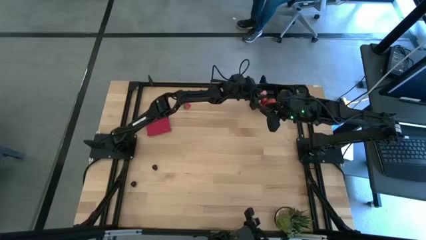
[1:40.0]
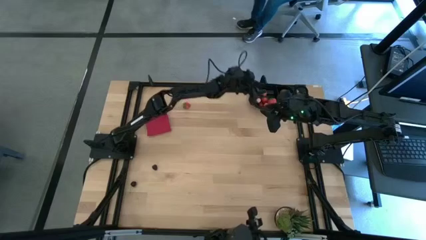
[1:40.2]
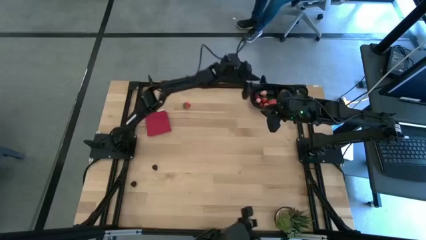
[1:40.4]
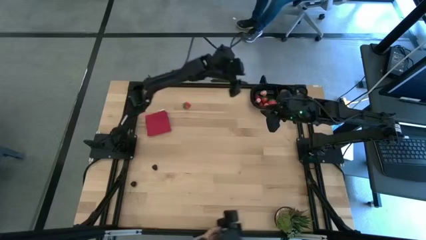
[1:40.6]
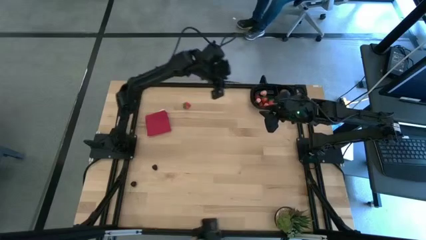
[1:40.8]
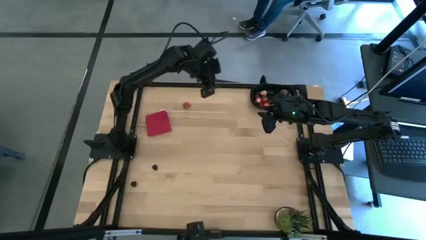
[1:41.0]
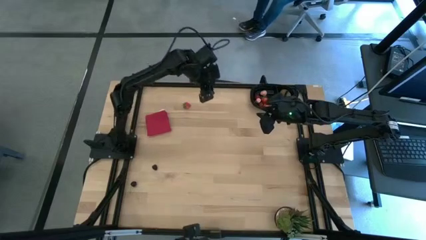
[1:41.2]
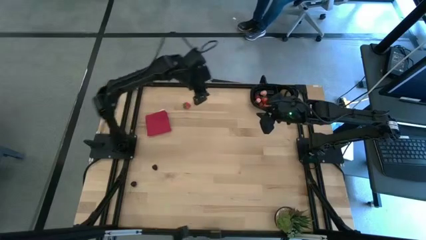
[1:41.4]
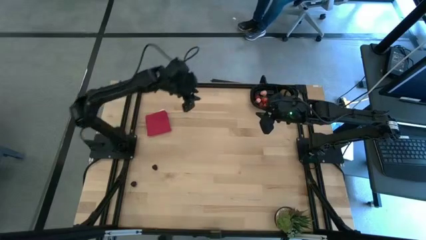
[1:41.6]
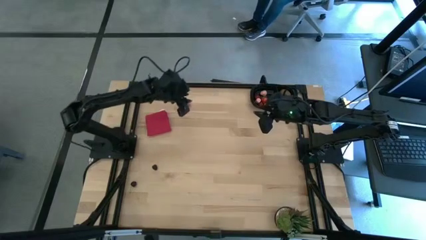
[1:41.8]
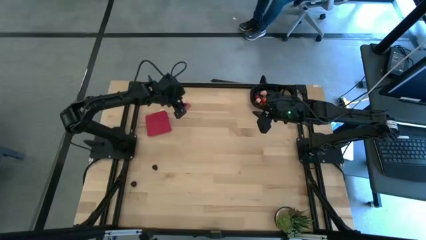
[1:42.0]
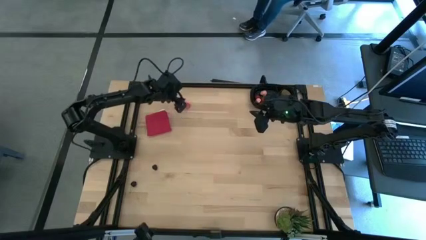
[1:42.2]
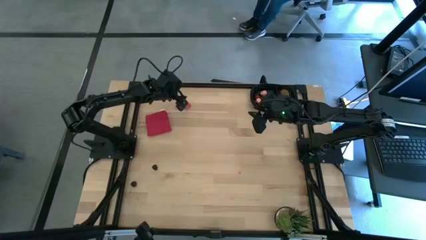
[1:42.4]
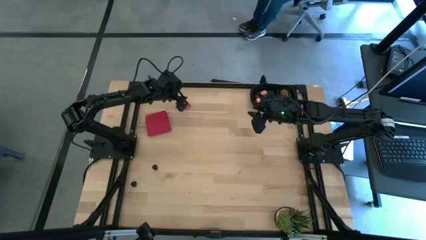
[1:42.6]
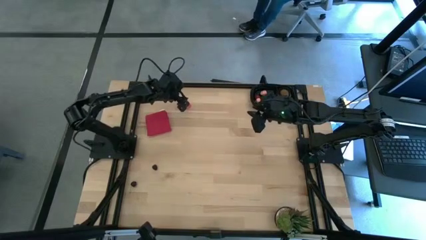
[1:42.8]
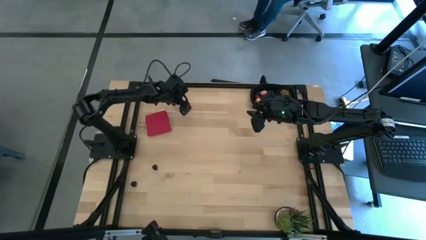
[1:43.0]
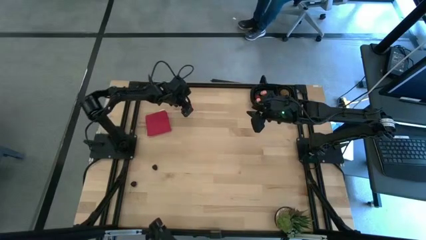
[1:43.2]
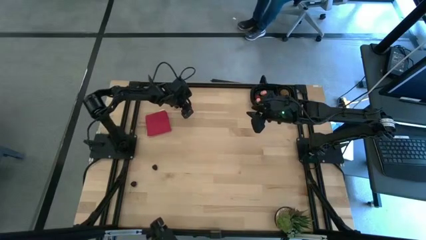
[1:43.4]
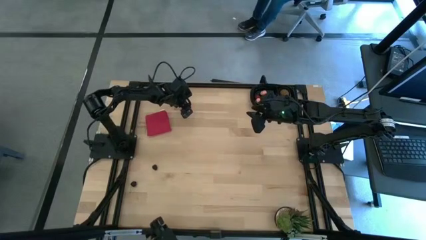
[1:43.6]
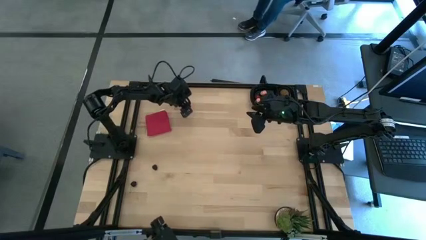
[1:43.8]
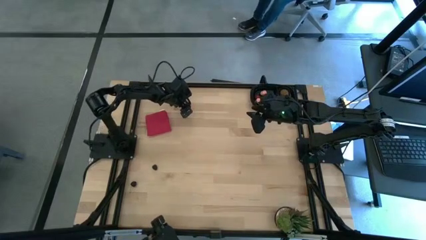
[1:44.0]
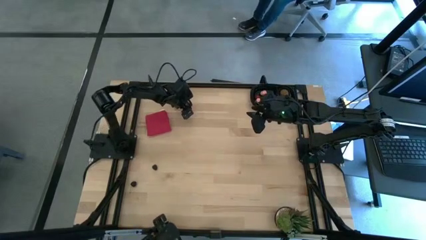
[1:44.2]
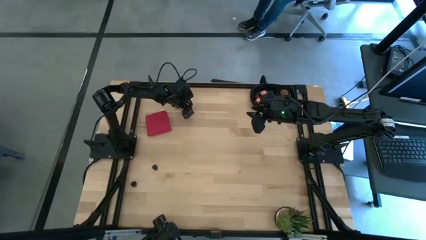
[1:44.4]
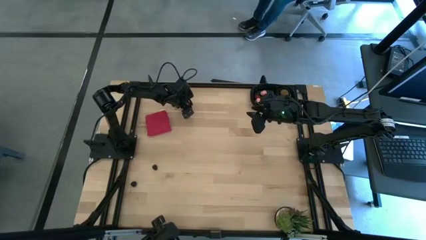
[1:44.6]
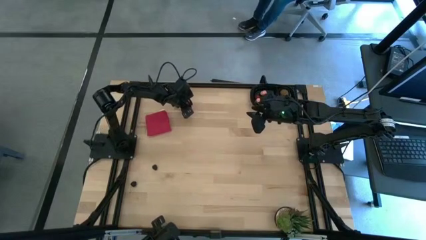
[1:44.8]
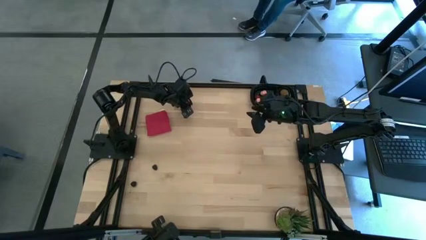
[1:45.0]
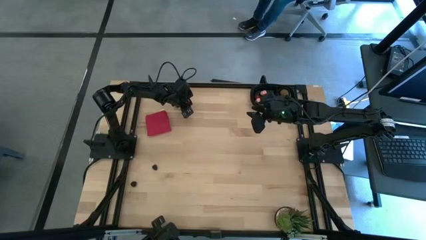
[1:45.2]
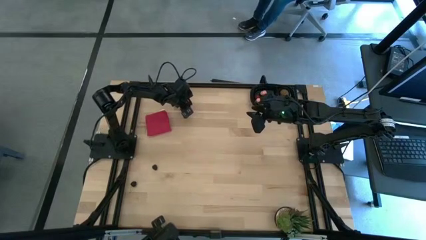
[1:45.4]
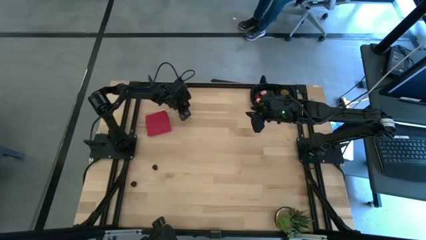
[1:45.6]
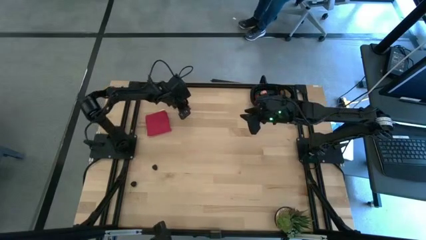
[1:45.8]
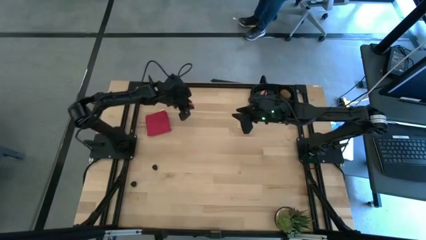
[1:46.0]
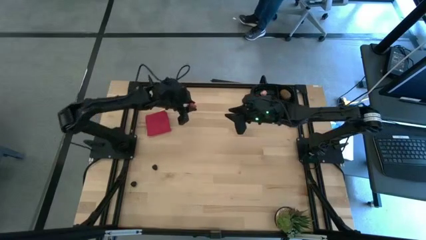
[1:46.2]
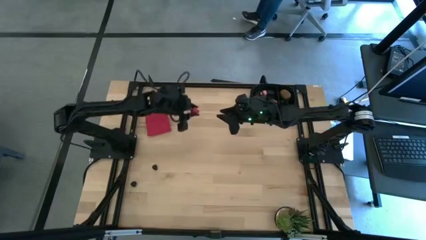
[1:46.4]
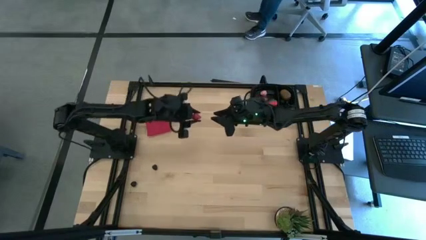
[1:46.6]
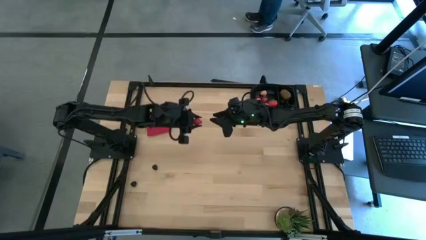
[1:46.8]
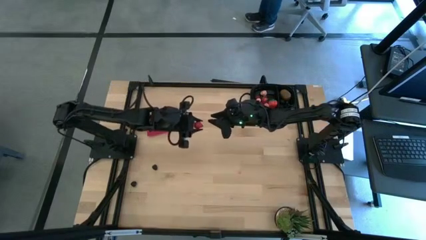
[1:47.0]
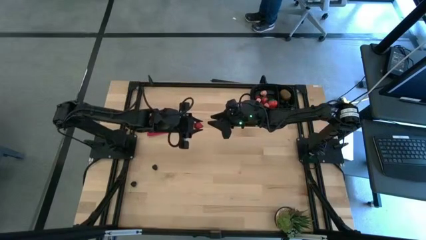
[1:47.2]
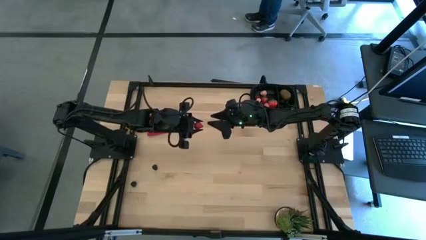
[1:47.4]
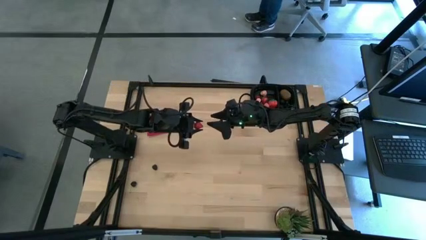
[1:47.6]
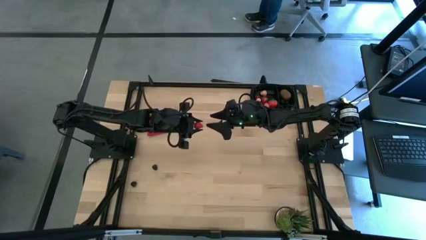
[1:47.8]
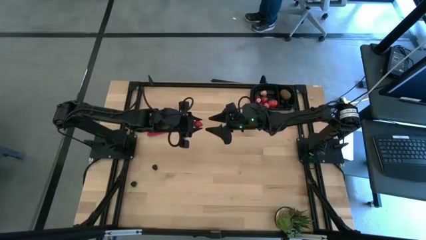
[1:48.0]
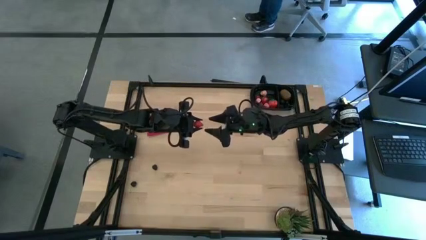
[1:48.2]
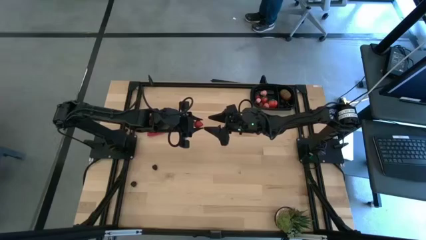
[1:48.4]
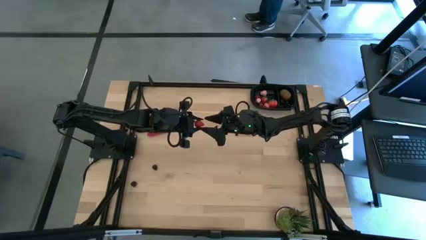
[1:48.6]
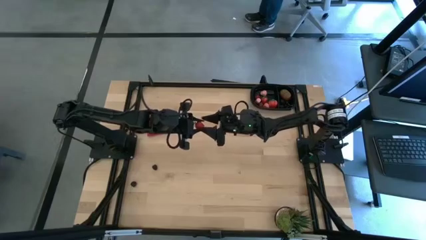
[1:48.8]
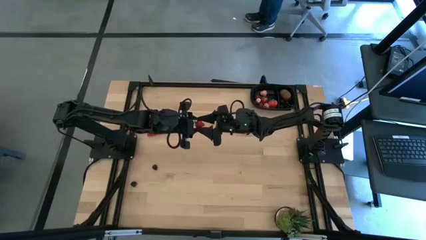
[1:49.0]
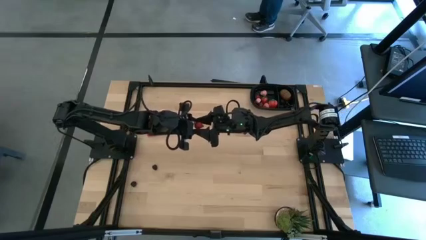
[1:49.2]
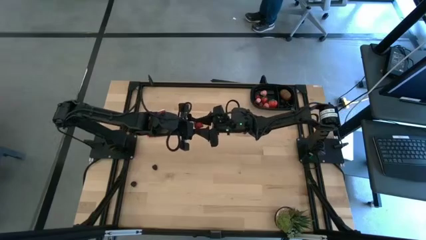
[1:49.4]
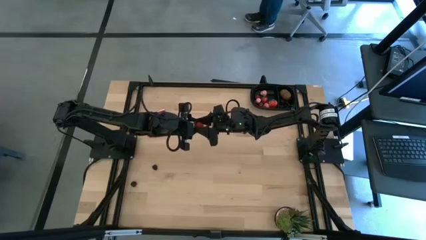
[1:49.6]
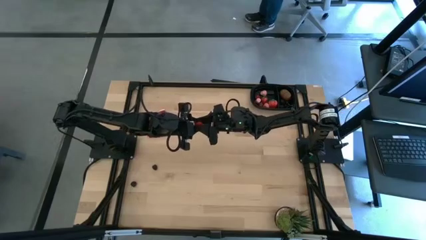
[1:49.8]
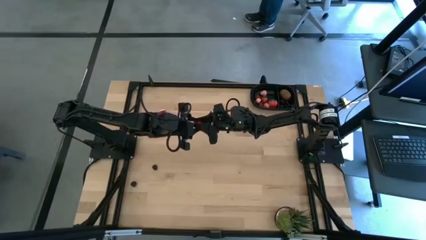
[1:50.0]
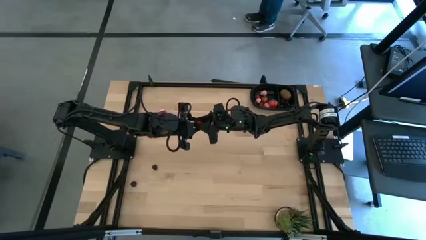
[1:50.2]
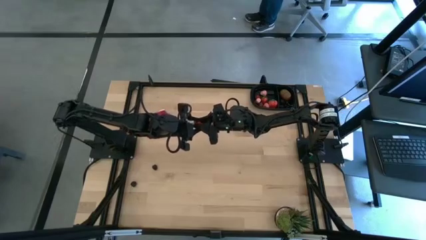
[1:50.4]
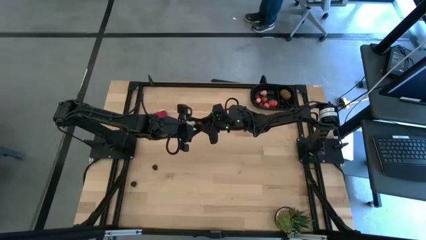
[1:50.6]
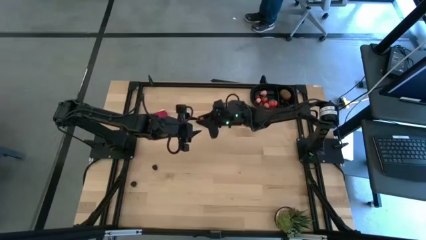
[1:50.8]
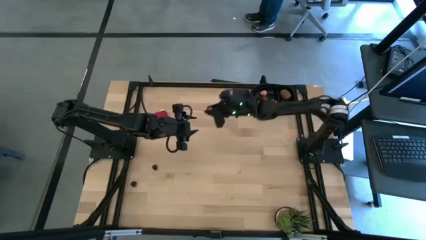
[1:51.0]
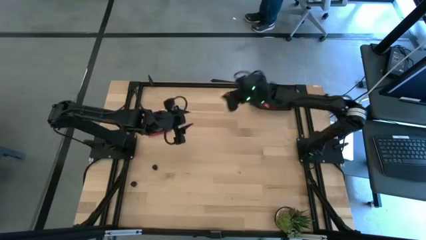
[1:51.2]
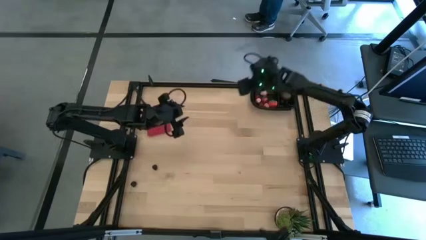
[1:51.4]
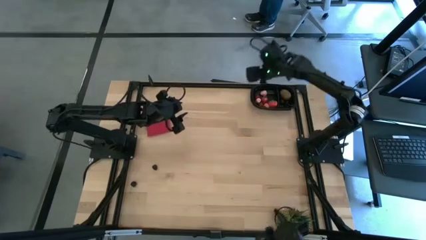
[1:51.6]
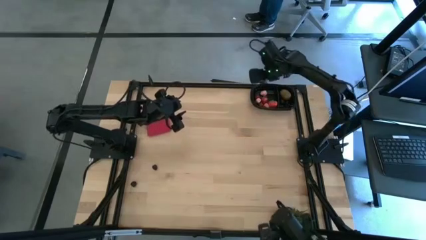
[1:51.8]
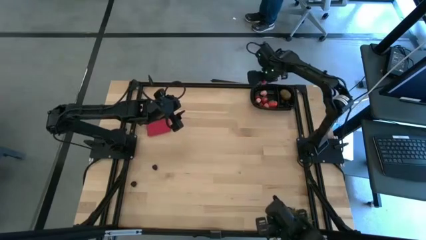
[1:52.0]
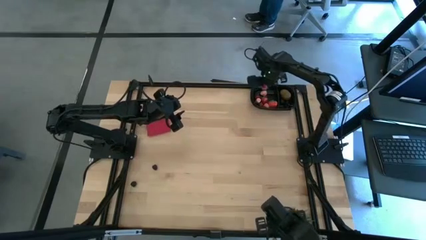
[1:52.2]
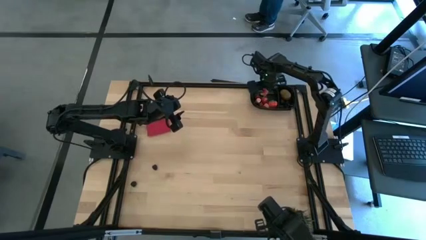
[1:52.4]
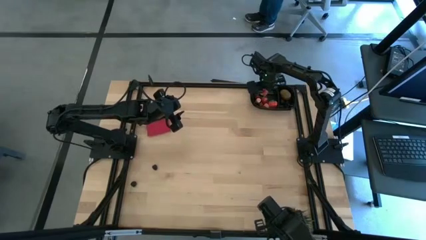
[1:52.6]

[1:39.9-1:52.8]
Task: Pick and placing Produce into tupperware
Put the red strawberry into the black bin

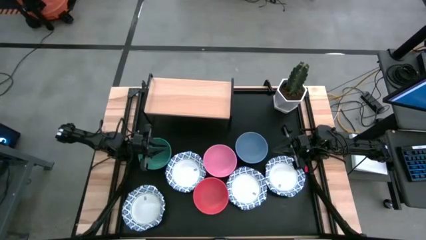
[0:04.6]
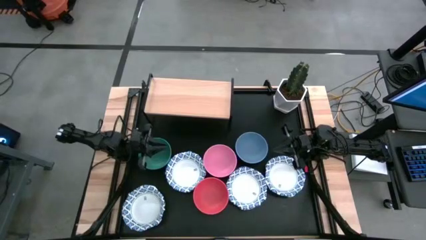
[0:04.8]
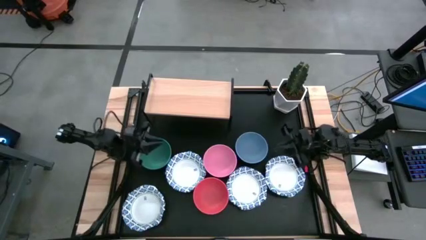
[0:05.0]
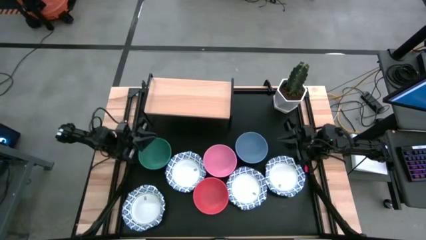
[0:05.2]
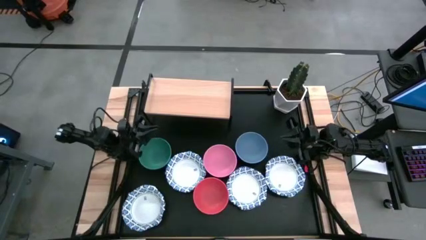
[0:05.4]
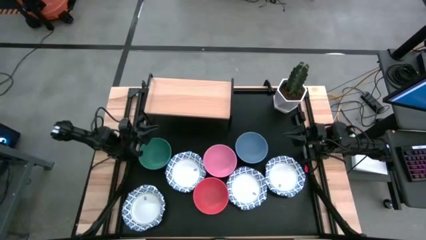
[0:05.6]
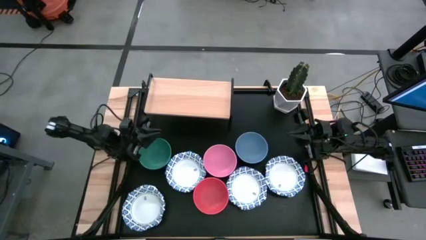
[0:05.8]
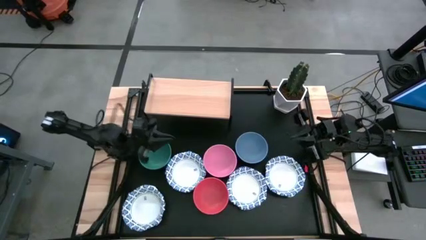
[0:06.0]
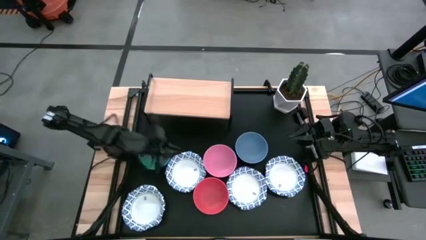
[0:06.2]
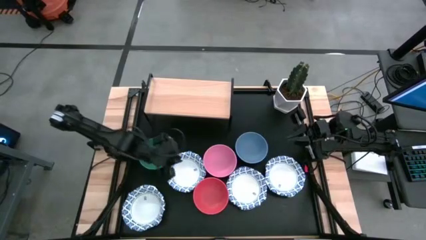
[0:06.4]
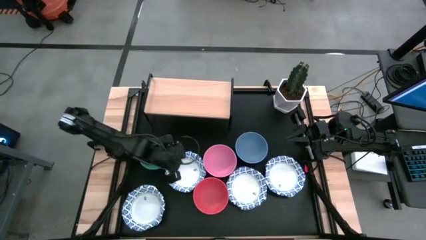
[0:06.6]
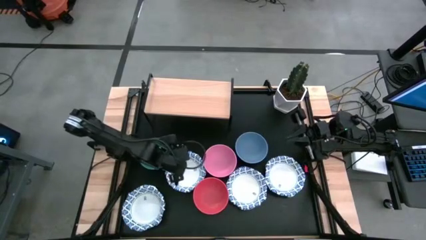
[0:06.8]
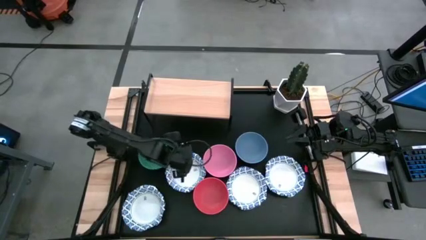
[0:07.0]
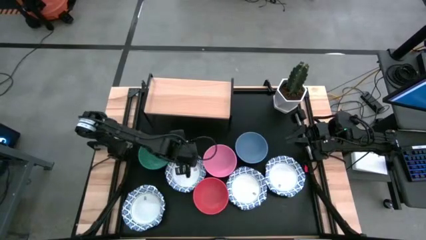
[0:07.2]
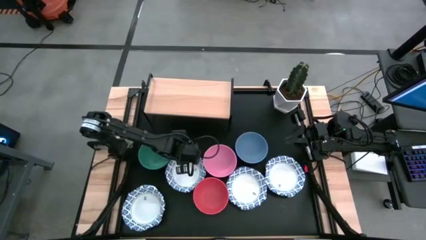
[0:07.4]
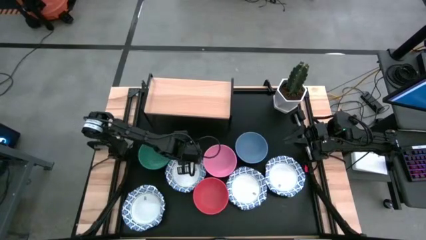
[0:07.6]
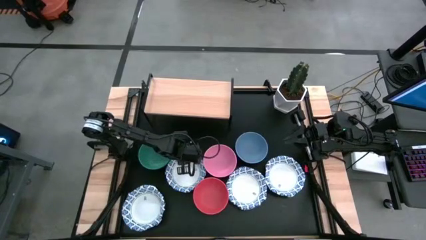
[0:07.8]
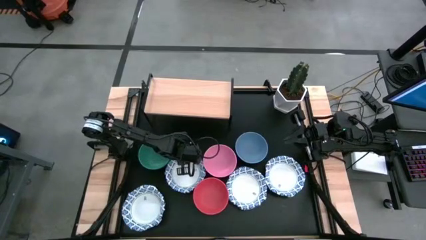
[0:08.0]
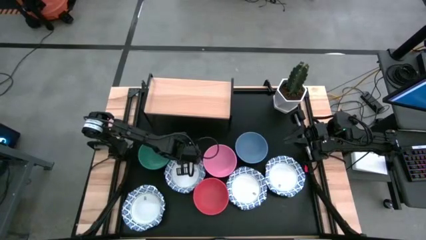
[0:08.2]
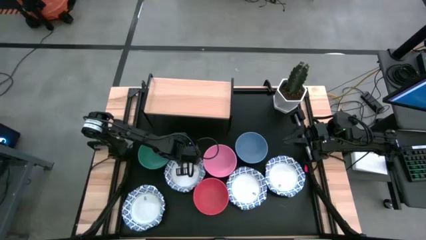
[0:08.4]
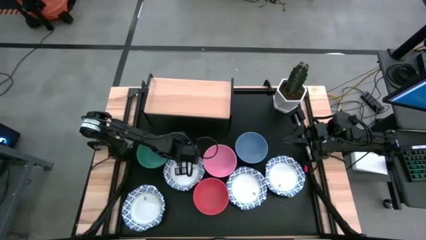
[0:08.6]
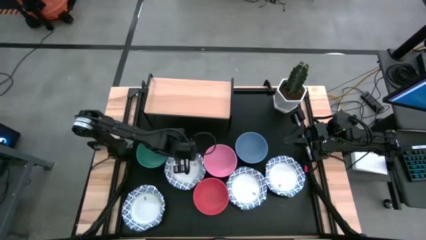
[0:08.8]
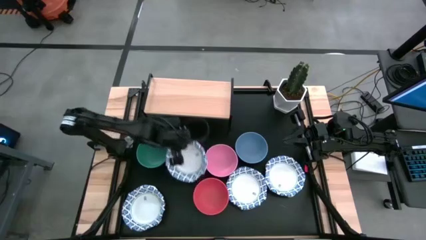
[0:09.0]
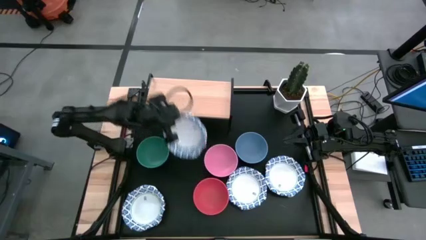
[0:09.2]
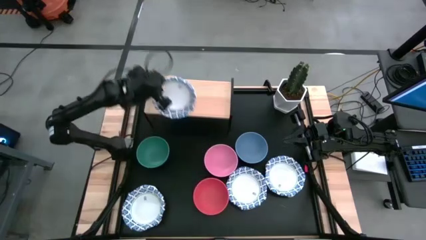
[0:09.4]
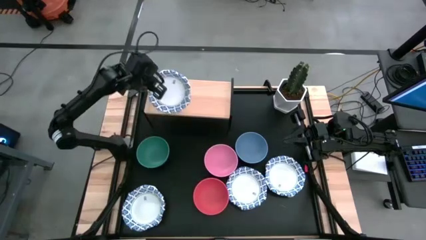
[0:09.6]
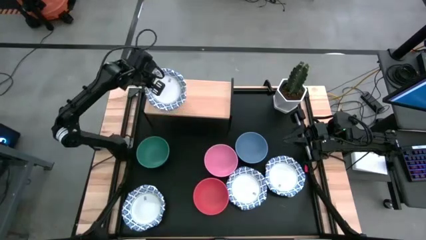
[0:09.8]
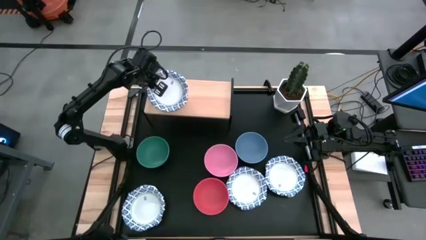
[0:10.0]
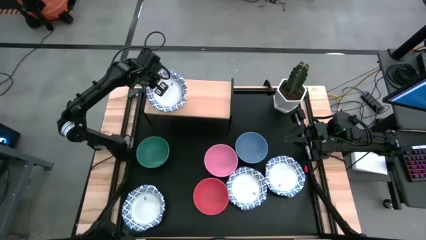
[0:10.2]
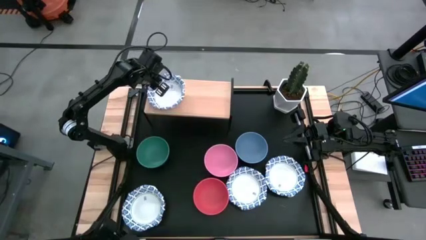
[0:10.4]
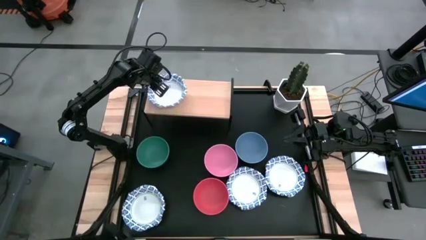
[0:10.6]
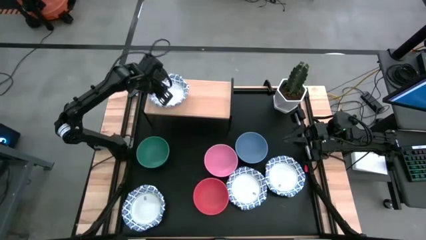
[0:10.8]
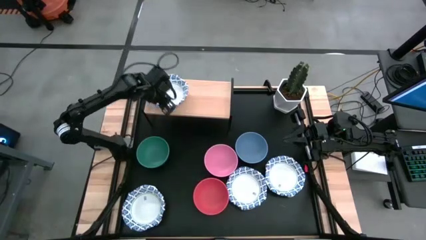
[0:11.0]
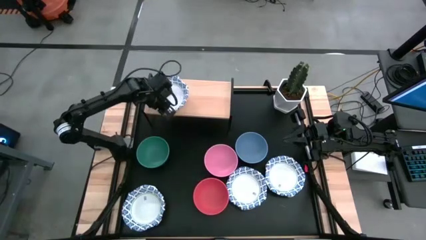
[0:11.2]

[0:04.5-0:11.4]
Task: Place and stack bowls onto a shelf
Put the white patterned bowl on the shelf
